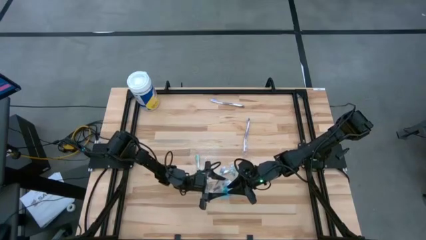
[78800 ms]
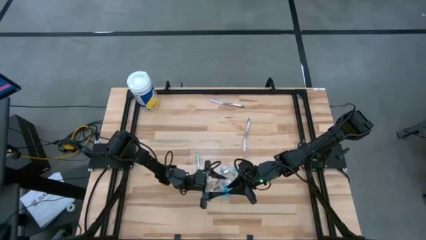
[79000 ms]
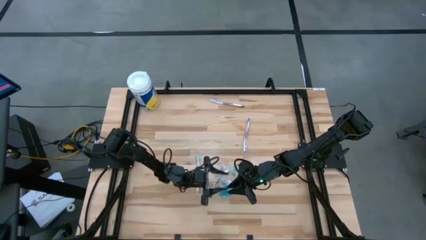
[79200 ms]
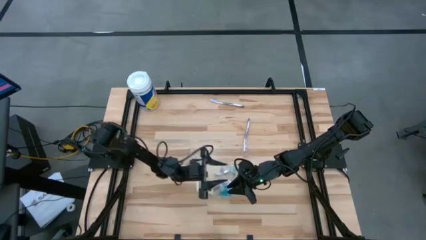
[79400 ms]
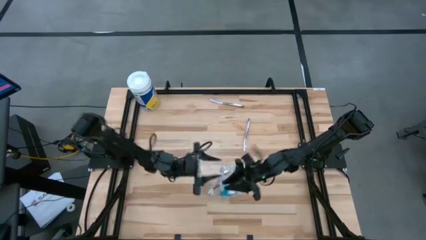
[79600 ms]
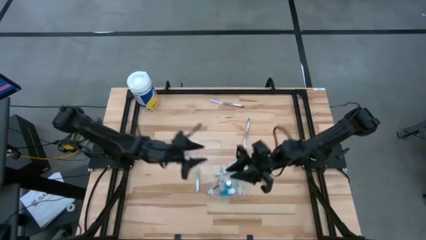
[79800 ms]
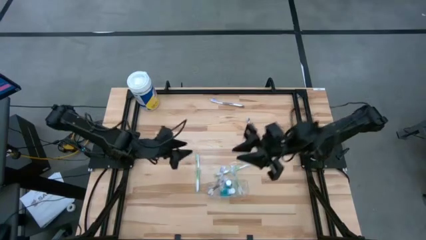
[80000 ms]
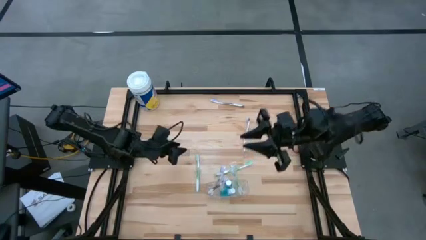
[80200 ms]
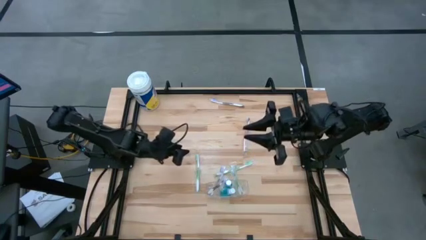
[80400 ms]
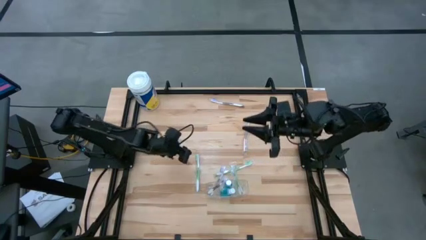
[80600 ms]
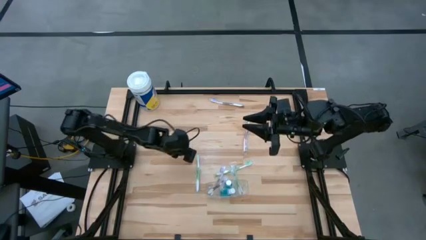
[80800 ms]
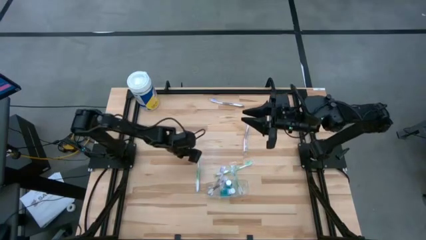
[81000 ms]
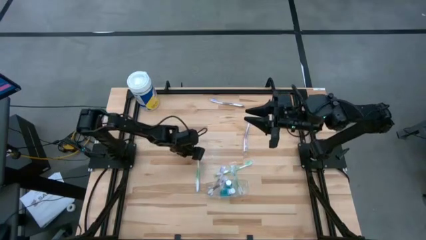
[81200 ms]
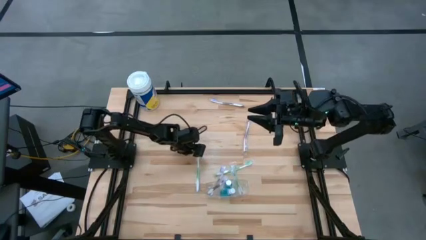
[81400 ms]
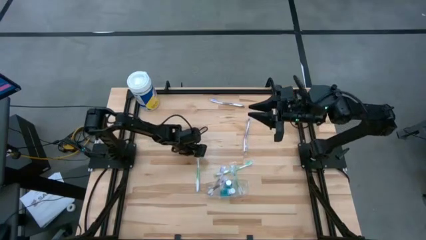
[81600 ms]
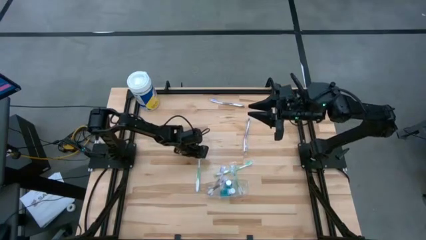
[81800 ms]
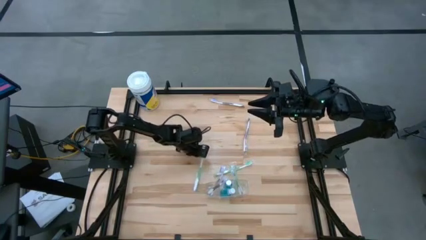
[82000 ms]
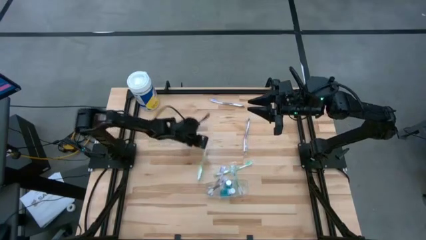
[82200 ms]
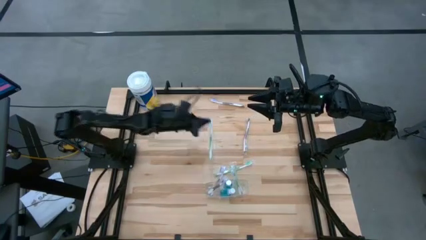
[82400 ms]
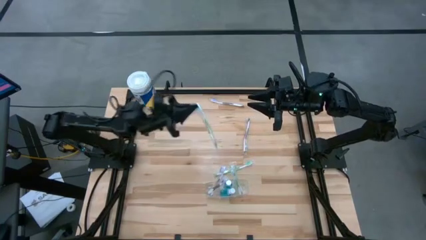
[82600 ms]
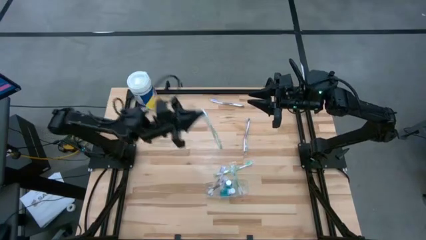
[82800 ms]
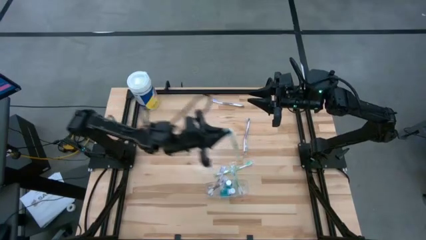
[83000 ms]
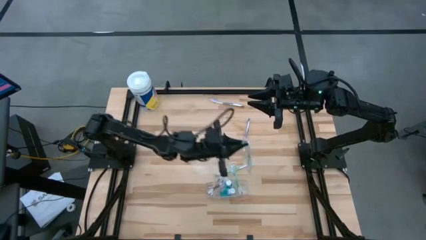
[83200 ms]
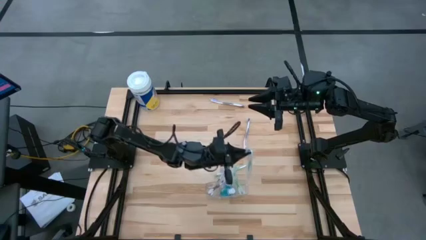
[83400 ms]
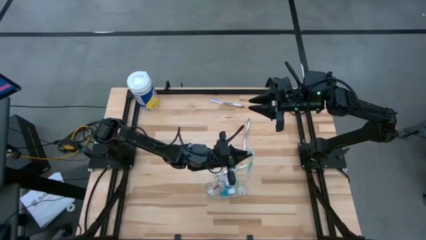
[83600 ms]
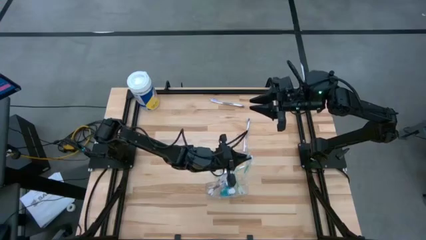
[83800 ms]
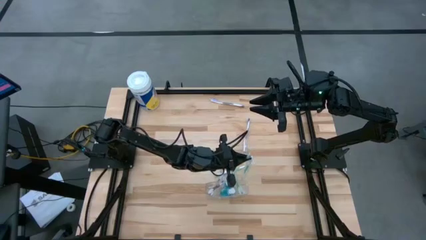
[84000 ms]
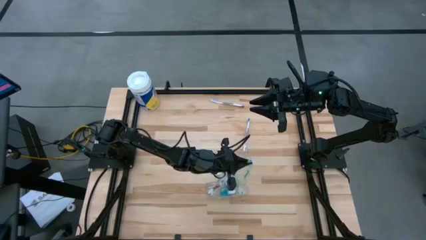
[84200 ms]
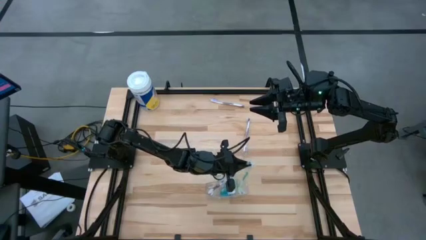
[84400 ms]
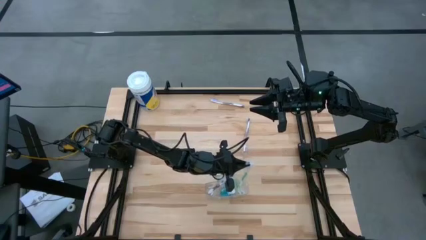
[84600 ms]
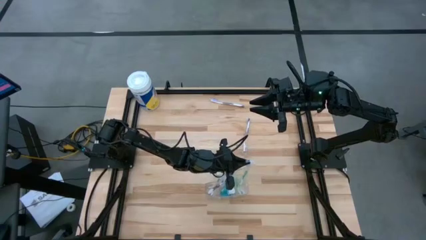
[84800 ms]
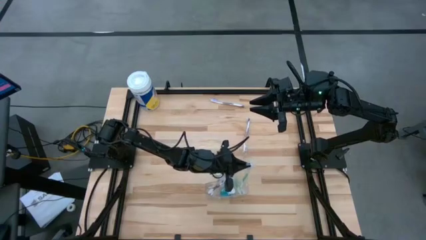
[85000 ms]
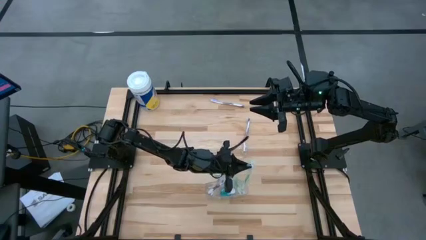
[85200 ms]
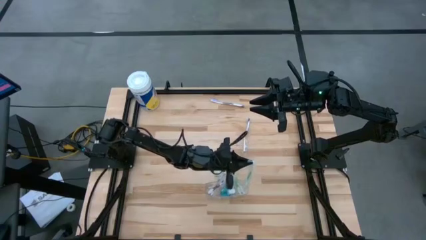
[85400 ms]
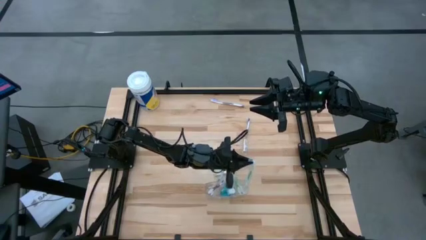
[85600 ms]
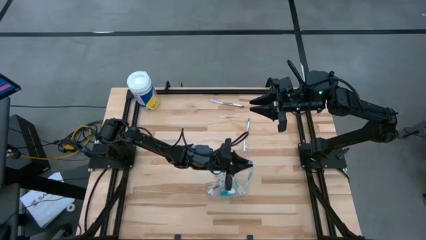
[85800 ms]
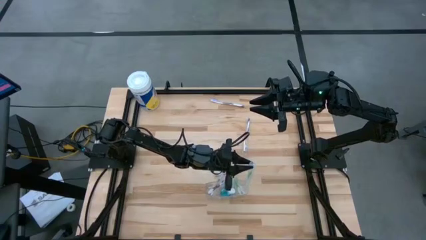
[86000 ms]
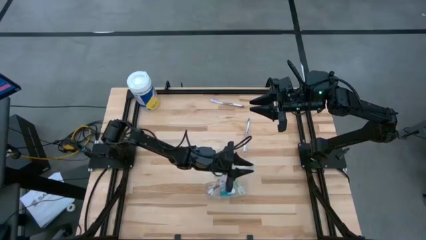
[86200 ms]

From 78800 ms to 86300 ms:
Task: Pick & Place toothbrushing station
Put the green toothbrush in the transparent organizer

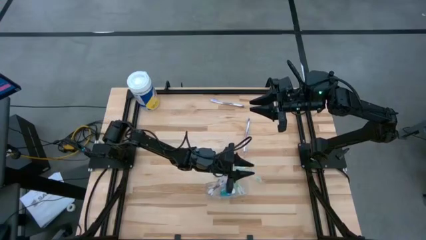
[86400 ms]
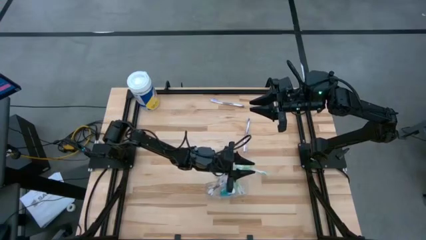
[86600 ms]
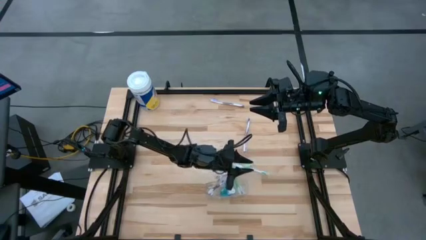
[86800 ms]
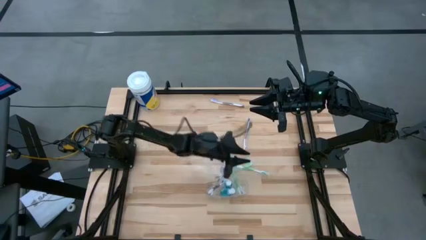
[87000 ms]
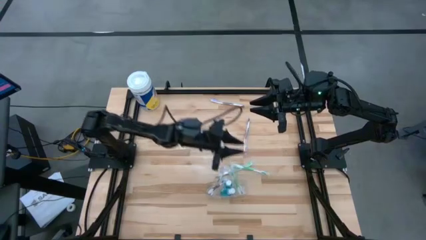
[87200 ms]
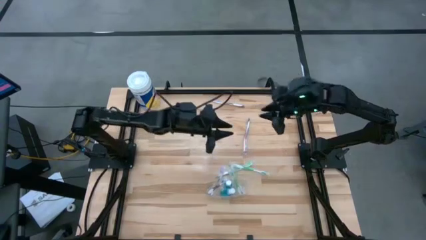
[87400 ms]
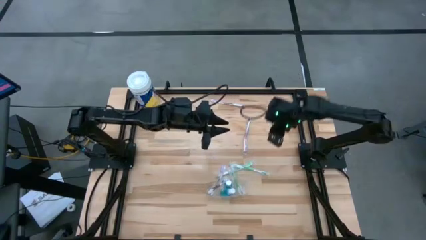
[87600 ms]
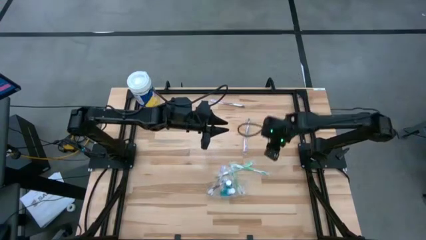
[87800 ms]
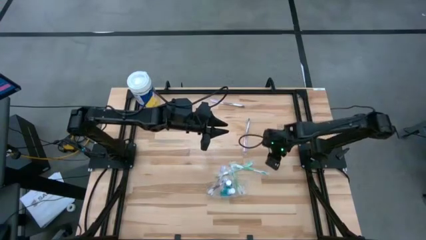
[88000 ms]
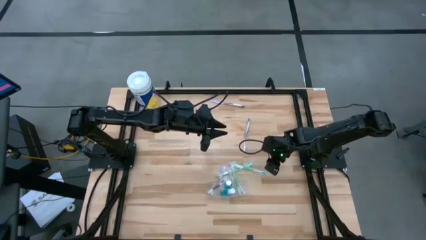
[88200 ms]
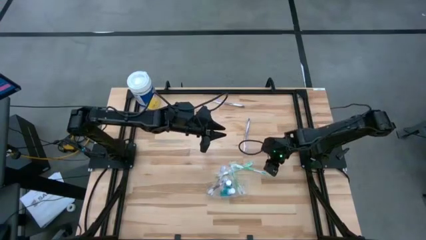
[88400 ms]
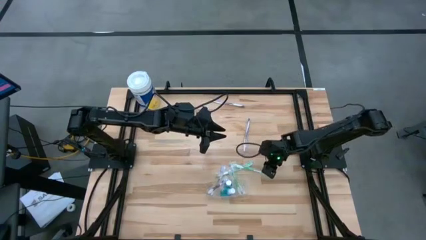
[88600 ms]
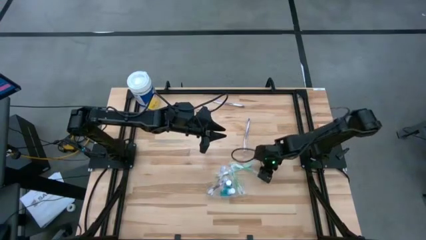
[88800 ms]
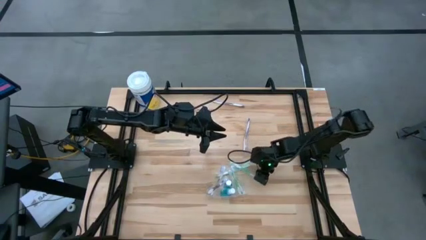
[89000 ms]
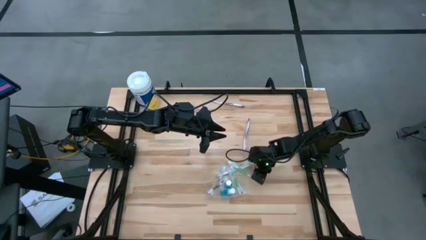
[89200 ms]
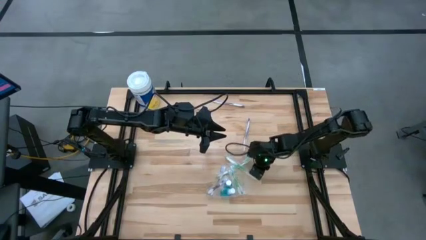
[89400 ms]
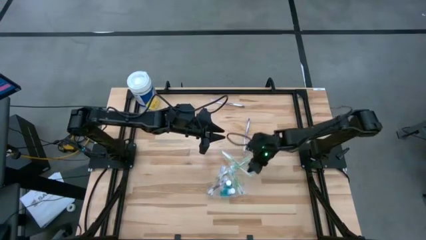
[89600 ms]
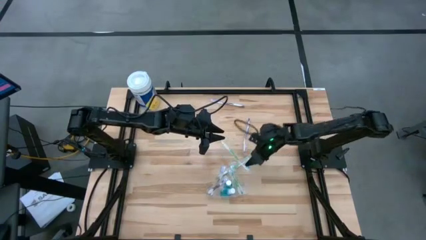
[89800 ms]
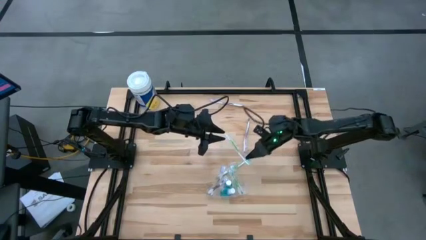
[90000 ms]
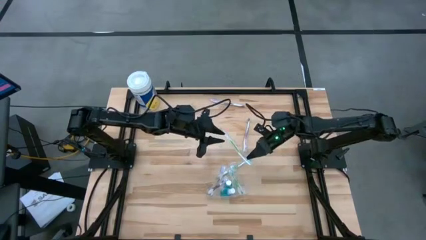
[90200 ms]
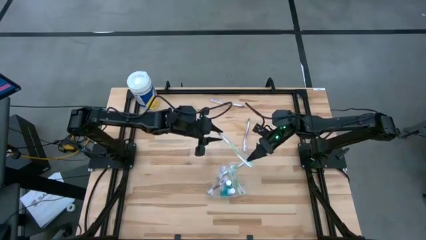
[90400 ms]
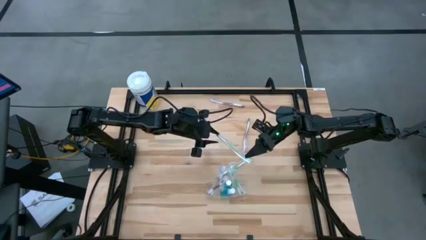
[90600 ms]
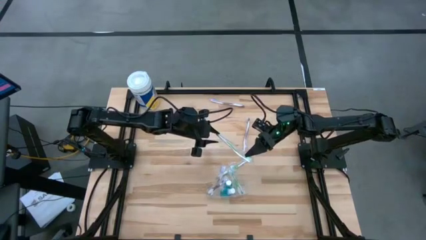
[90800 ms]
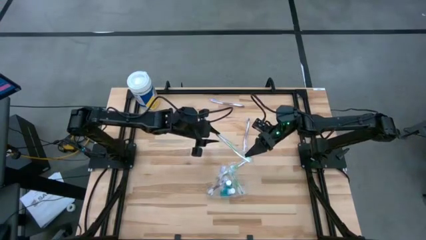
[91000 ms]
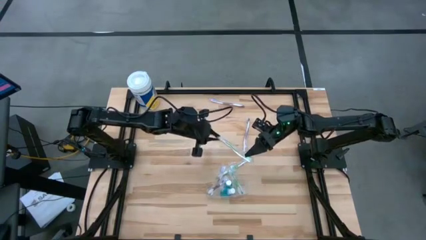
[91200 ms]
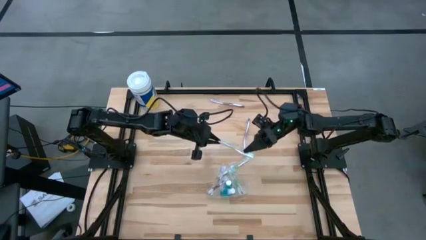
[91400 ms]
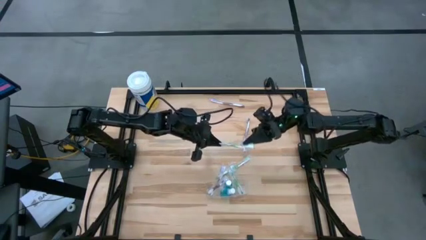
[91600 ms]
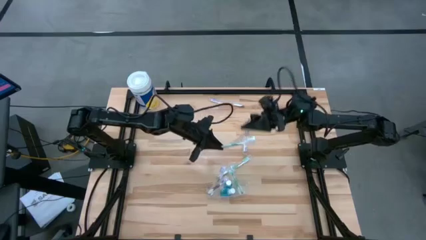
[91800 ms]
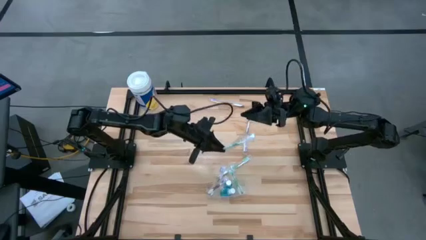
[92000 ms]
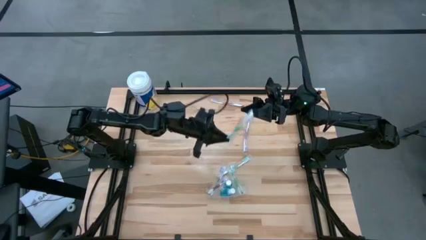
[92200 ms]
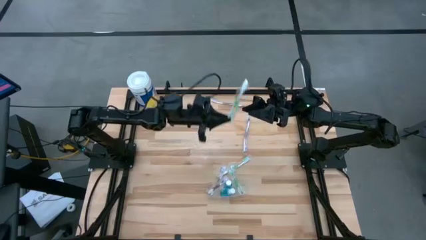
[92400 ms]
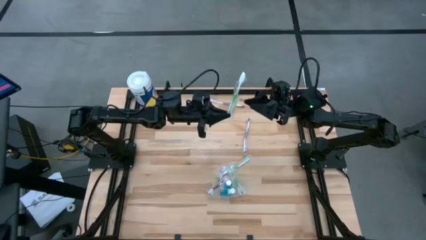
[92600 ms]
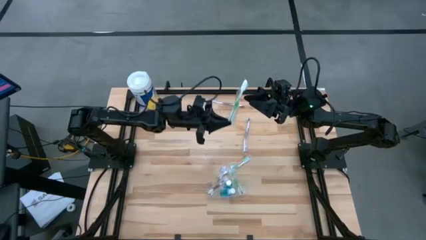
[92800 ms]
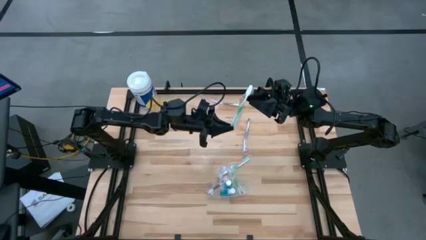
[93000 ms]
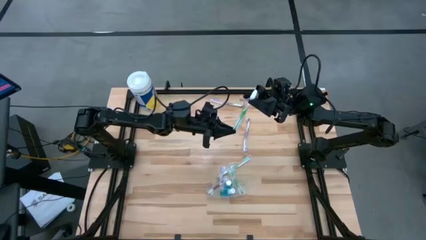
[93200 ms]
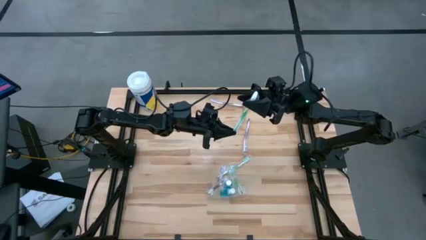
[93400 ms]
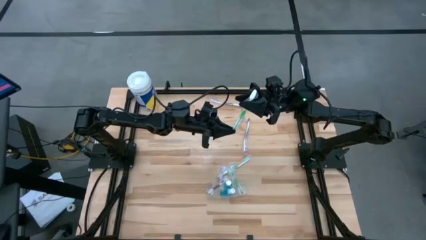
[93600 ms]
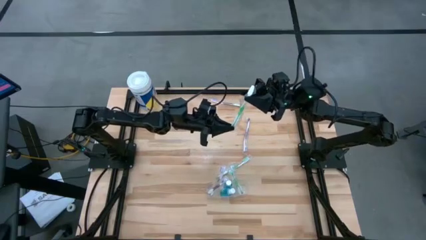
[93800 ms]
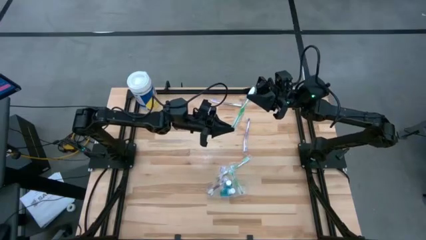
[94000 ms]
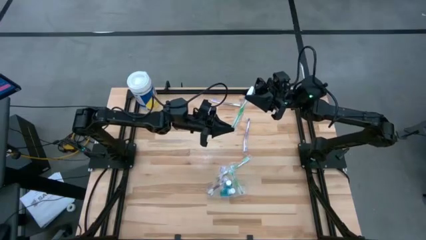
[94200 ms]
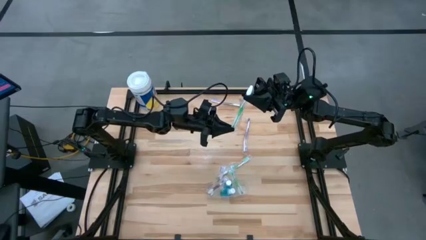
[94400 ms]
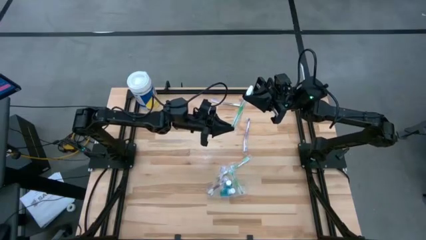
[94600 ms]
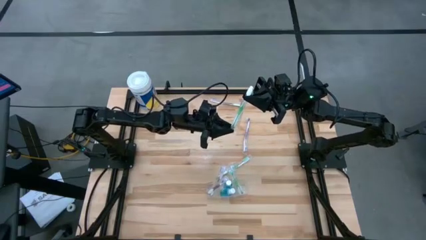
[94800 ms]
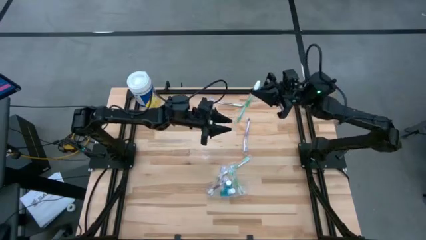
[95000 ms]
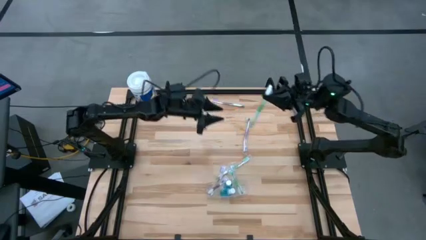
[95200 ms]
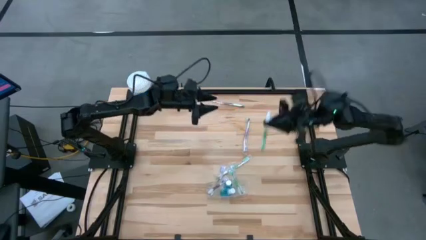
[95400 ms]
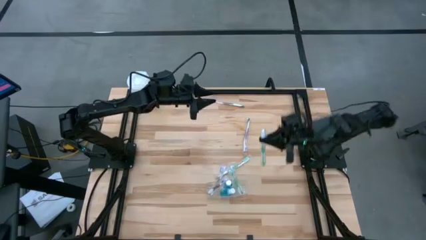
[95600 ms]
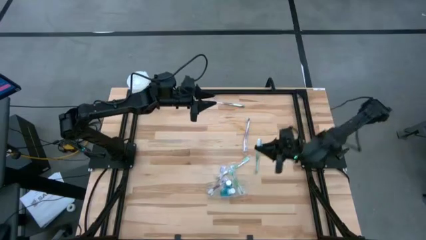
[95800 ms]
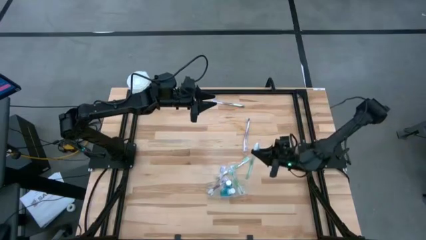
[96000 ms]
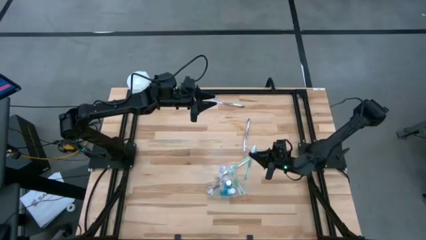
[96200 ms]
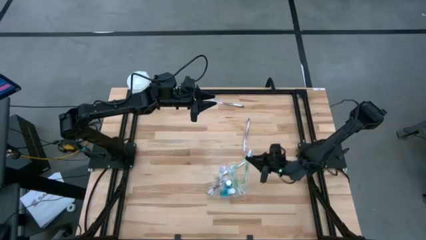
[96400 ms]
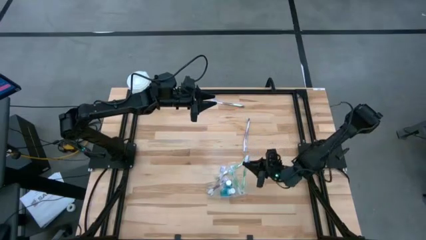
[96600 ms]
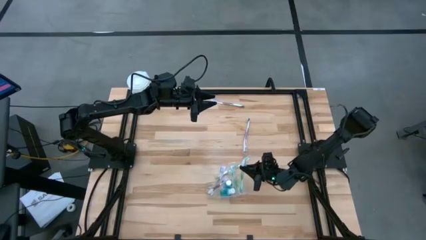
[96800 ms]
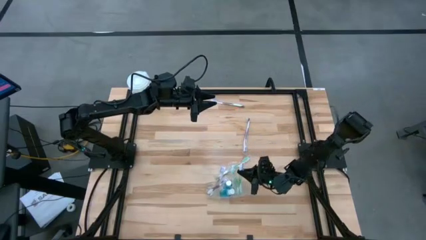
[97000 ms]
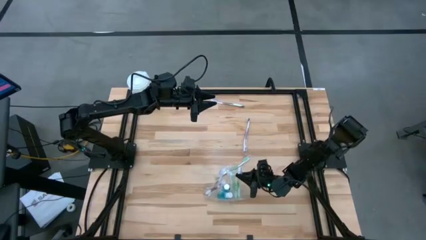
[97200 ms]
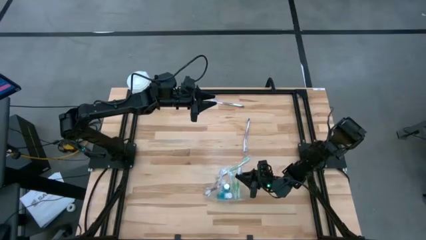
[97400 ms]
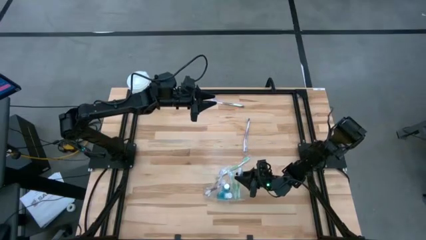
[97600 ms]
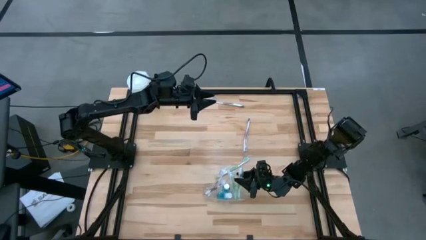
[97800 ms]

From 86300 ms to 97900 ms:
Put the green toothbrush in the transparent organizer
